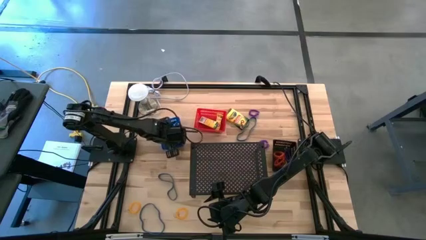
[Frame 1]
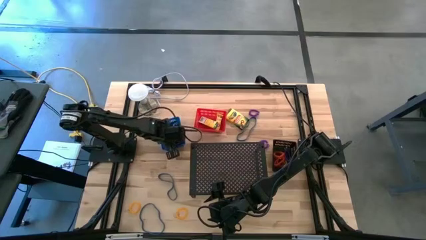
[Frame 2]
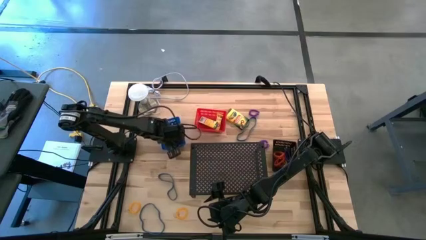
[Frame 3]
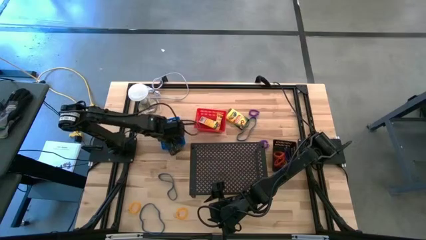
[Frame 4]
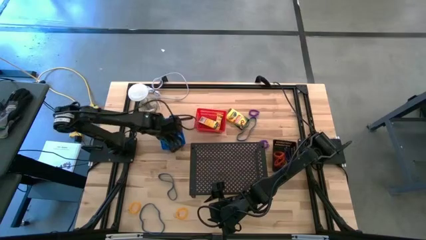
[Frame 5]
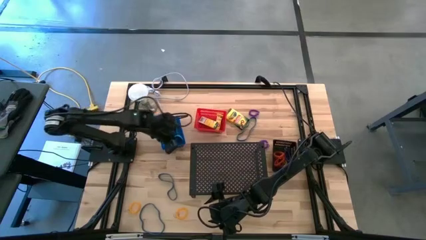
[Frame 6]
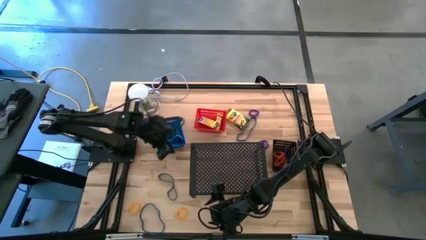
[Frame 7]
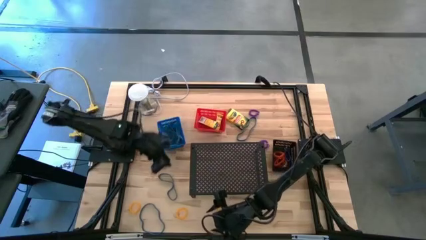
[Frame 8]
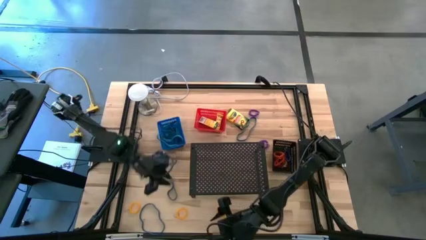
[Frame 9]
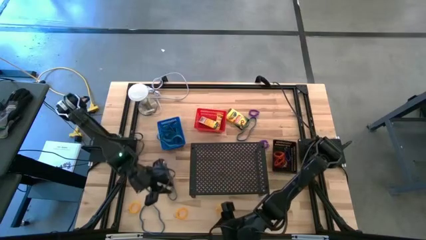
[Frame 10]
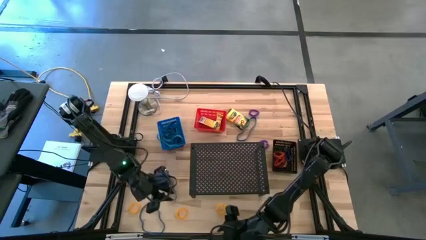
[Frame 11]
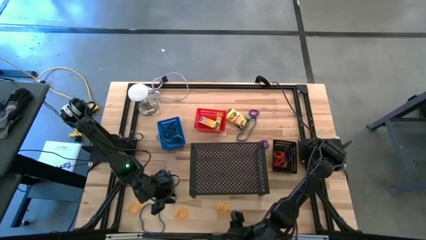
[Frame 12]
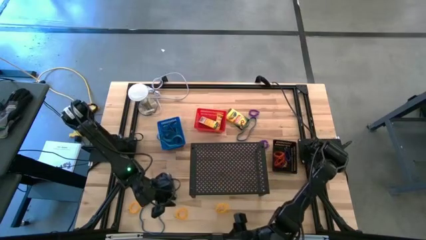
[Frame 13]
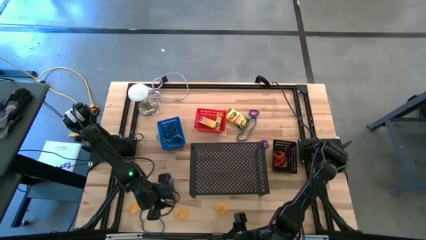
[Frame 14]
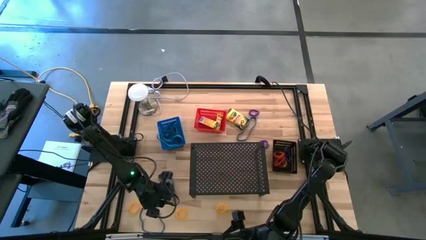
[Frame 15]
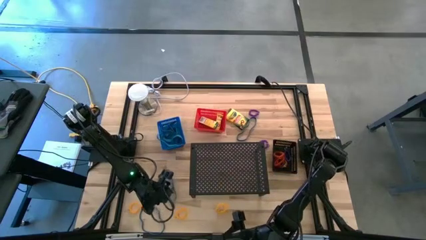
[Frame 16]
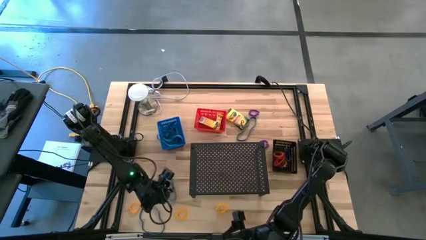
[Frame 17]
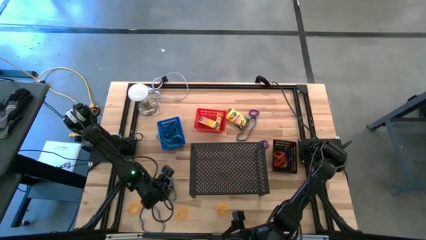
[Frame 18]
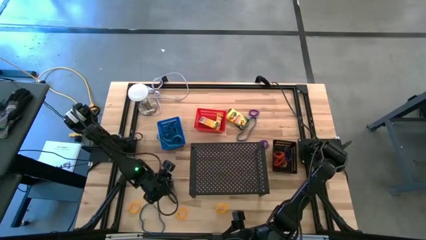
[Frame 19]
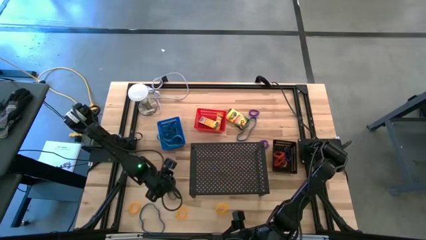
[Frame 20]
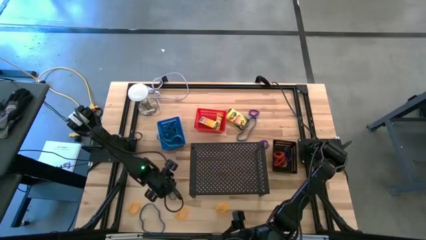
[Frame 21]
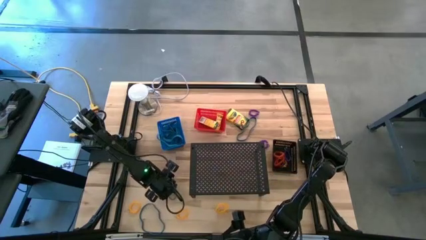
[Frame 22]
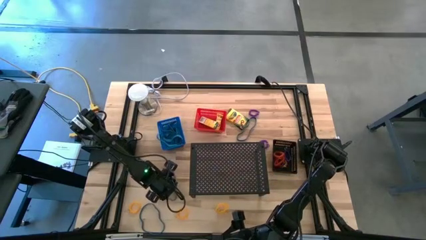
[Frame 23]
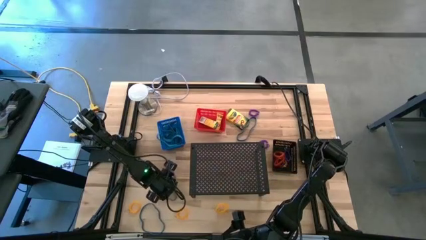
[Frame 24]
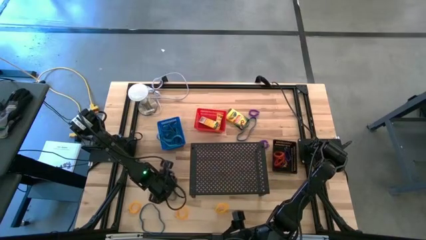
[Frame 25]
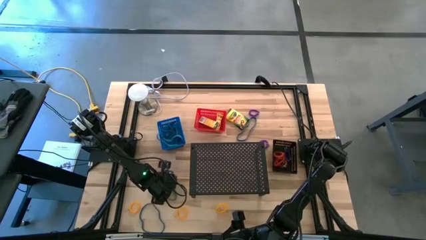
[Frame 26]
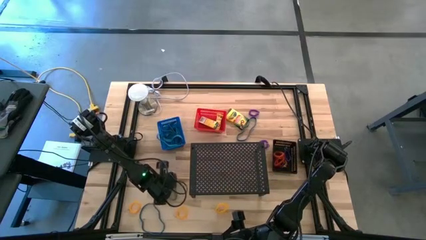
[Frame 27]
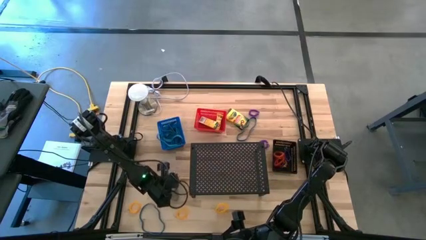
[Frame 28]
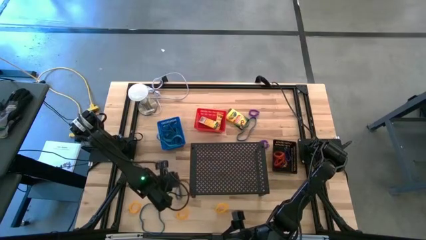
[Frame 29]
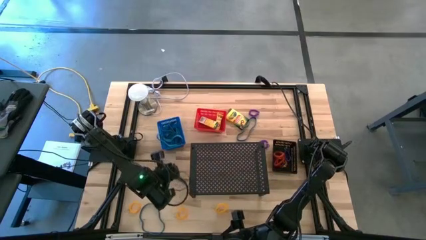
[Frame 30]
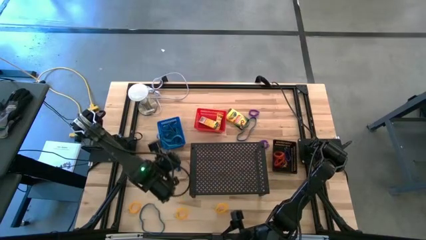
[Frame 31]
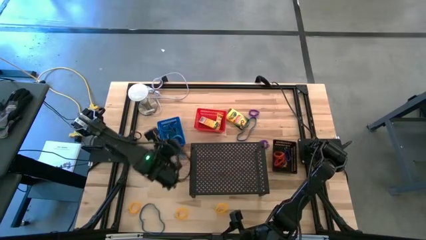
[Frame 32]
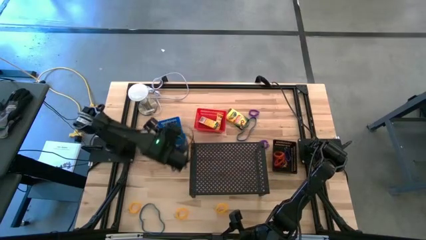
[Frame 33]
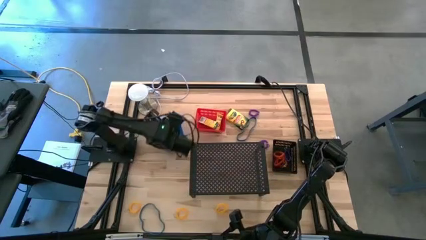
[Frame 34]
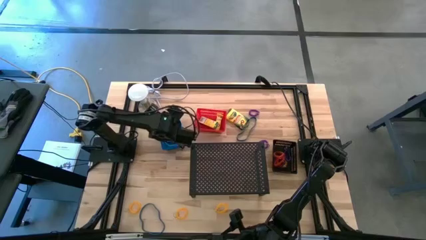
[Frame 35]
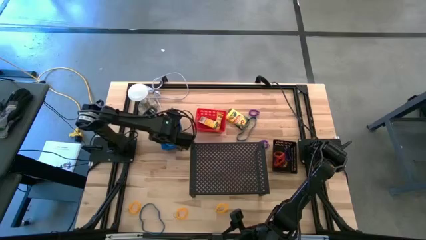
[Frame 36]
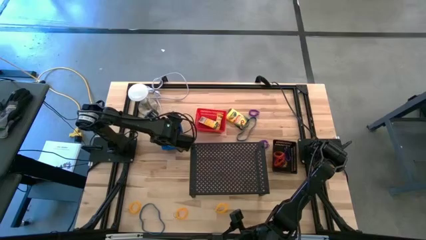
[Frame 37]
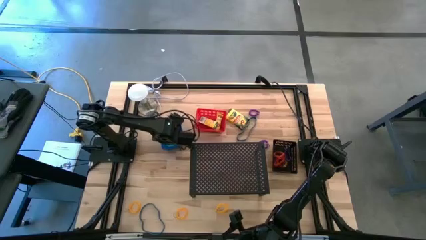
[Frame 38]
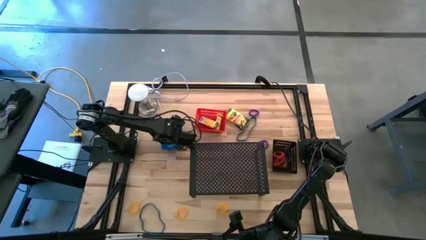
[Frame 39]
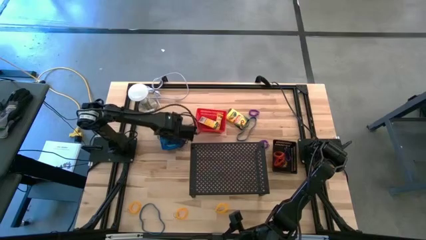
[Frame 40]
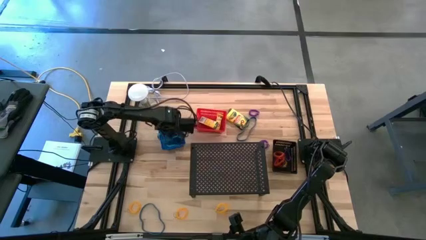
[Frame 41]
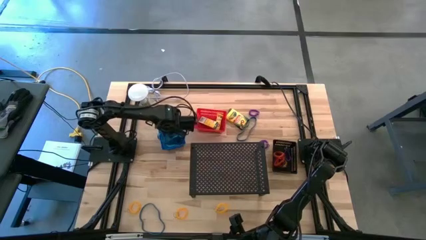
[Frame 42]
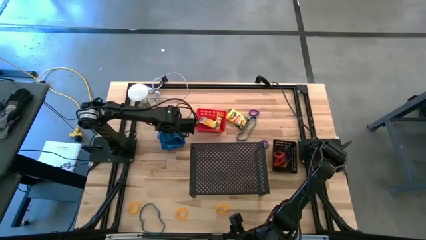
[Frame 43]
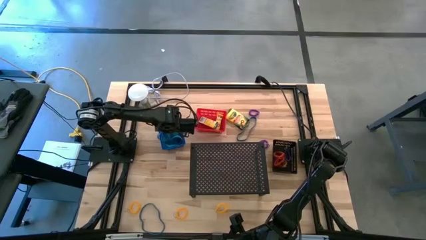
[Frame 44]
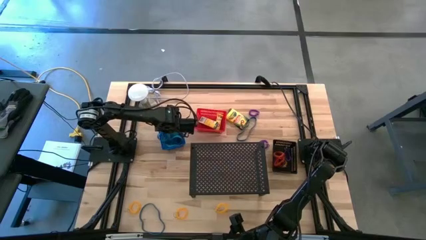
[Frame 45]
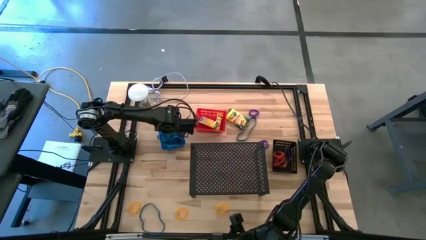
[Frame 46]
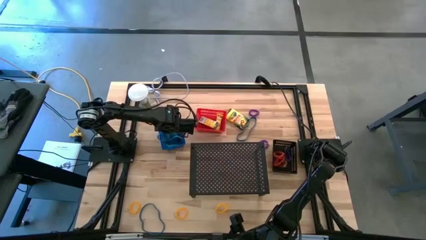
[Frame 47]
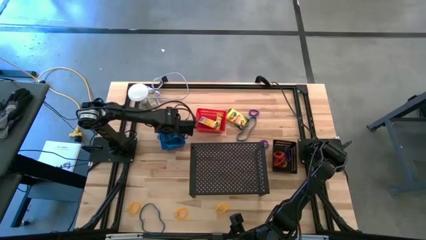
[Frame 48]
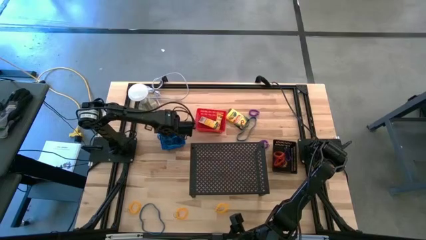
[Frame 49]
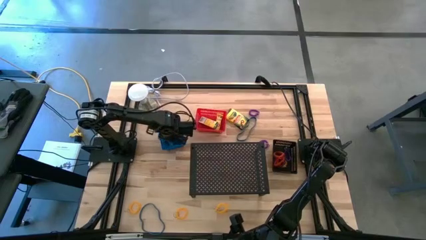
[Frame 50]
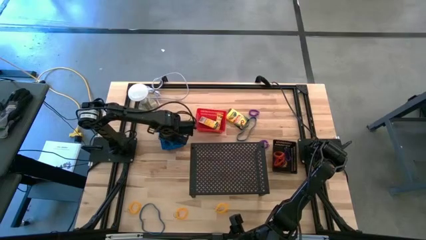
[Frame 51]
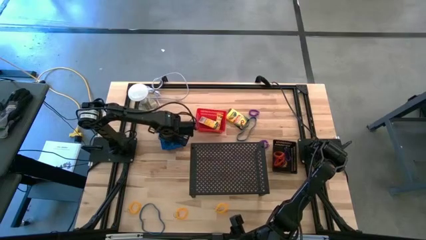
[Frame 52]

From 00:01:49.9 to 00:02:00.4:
Task: Pick & Place Office Desk Supplies
Put the blue rubber band into the blue bin

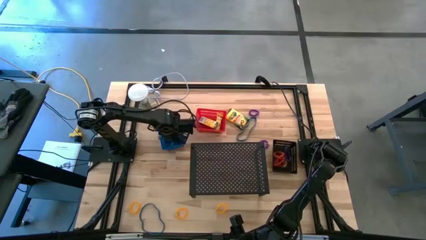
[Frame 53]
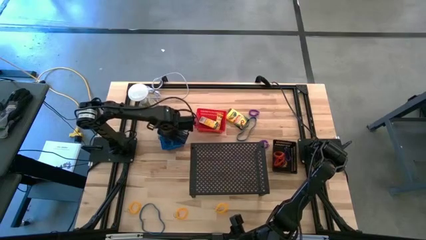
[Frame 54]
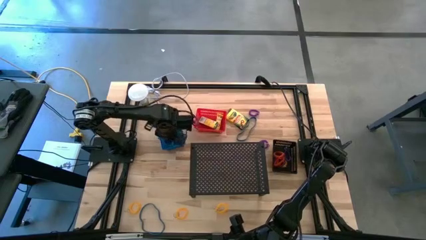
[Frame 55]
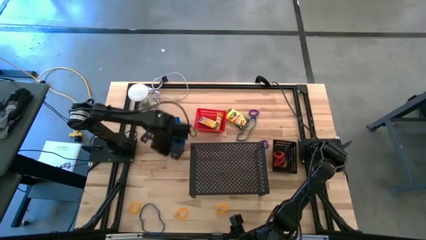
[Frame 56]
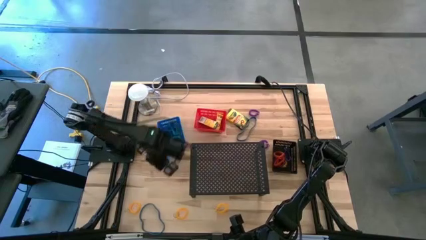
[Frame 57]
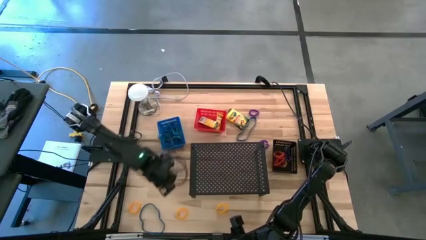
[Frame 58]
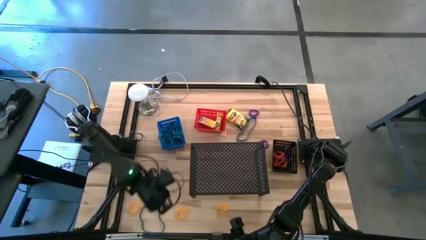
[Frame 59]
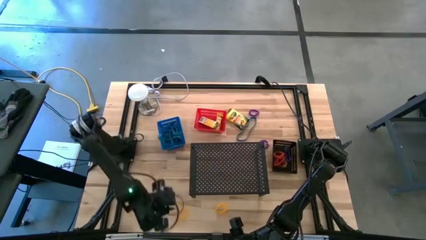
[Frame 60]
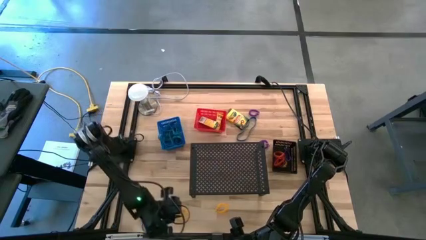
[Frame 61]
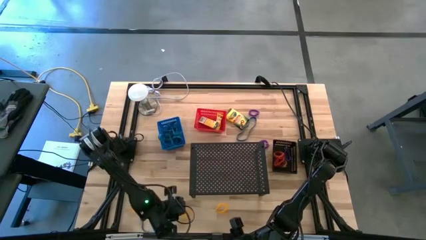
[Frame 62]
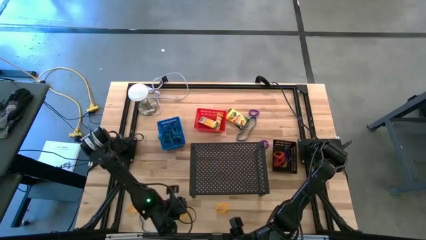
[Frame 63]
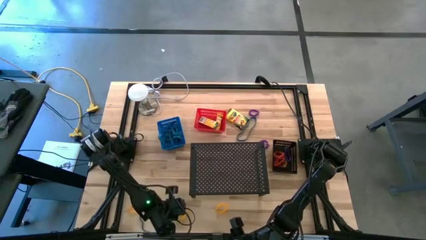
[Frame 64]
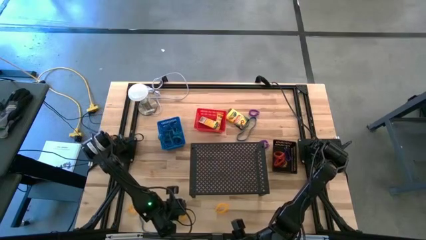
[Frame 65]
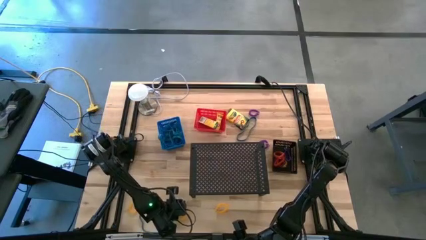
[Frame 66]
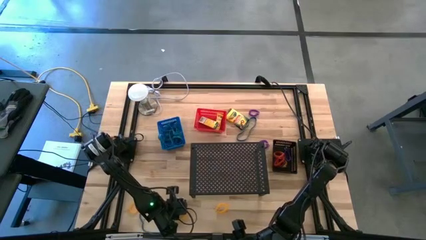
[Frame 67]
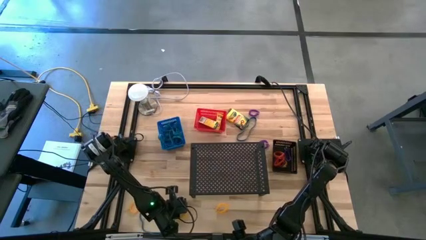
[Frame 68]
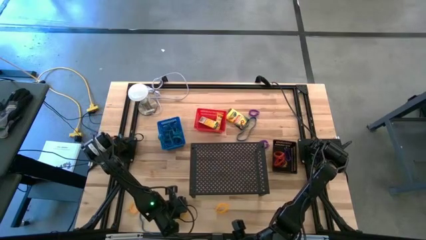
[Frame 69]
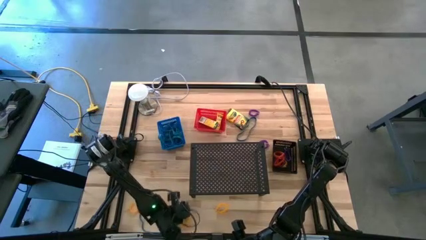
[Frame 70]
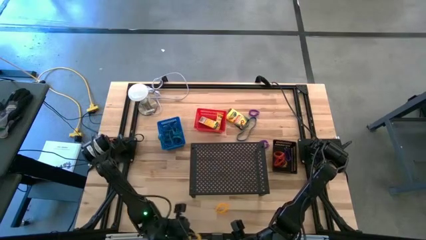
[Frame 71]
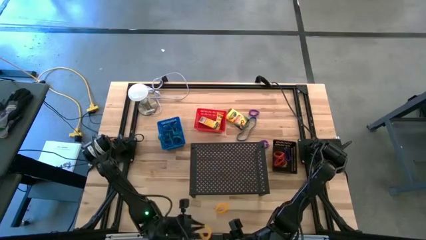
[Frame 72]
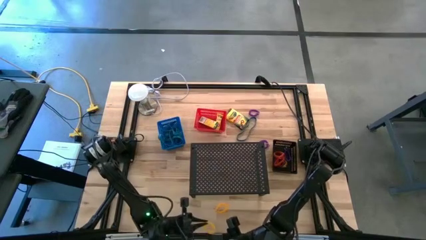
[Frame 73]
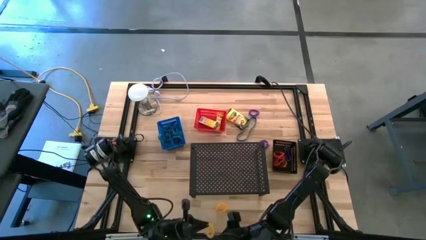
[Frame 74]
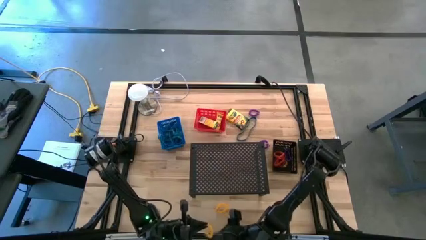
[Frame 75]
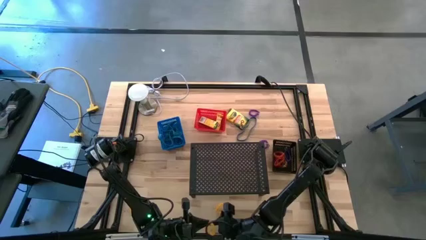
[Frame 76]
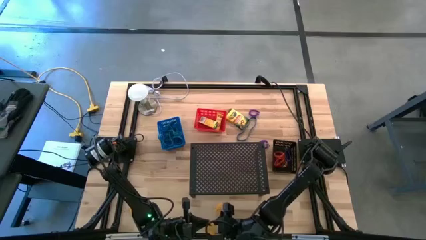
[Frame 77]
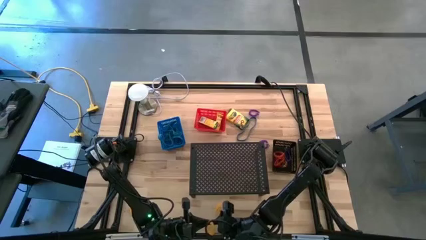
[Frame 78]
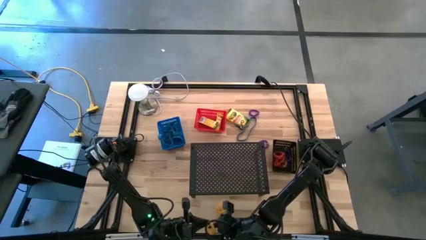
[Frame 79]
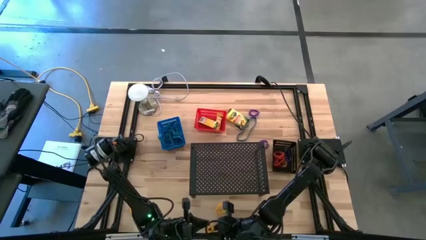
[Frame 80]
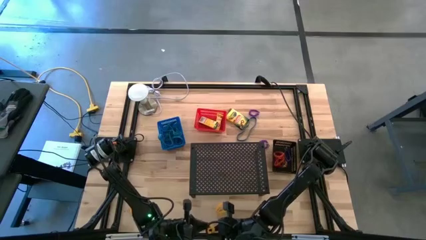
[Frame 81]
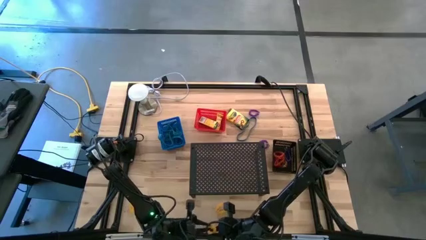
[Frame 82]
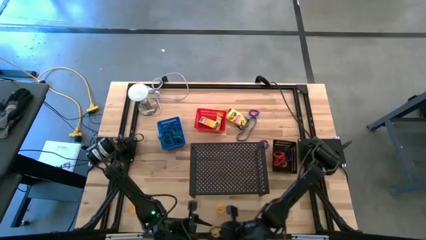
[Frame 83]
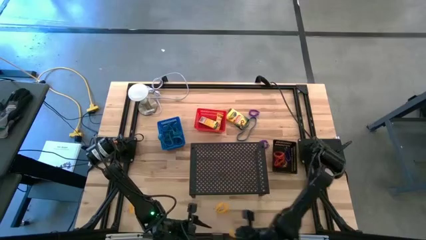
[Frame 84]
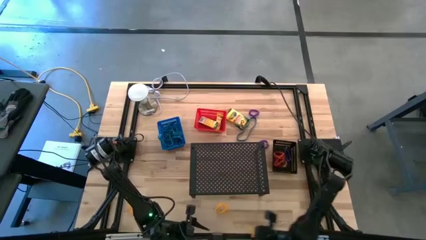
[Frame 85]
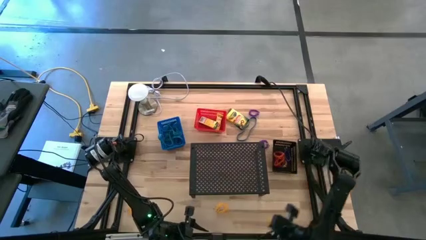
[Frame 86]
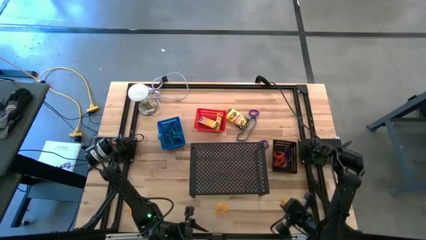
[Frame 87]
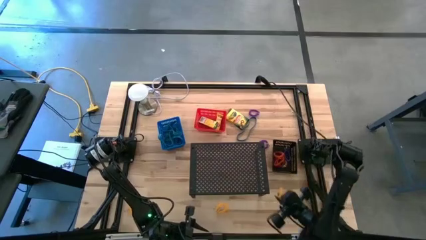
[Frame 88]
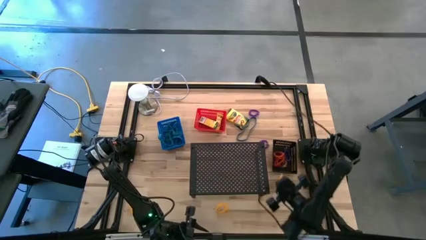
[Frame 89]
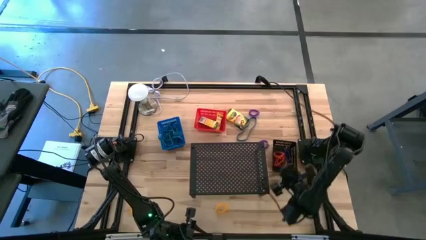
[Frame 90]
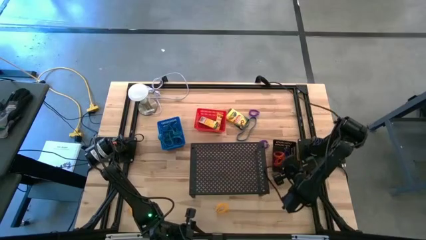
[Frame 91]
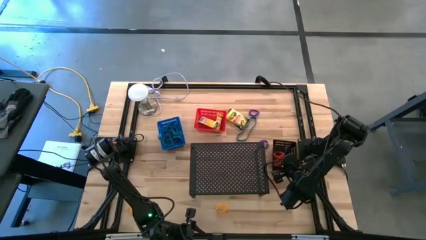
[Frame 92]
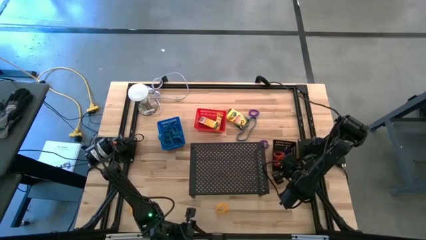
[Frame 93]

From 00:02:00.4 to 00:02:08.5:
Put he yellow spring keychain into the black bin
